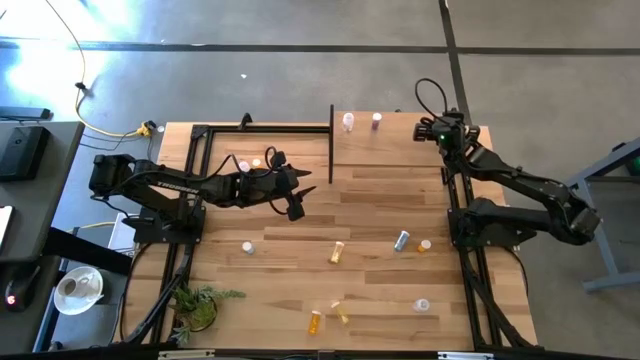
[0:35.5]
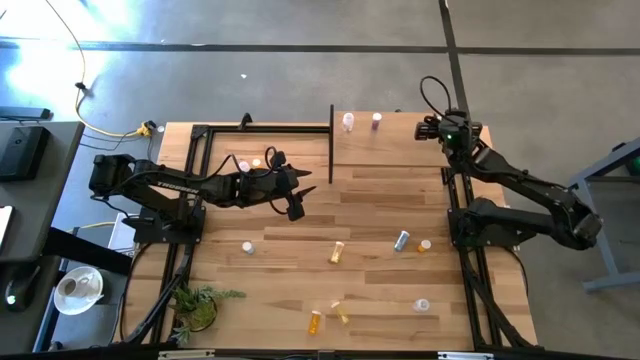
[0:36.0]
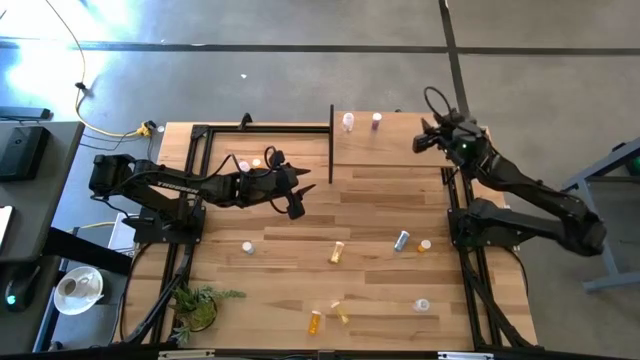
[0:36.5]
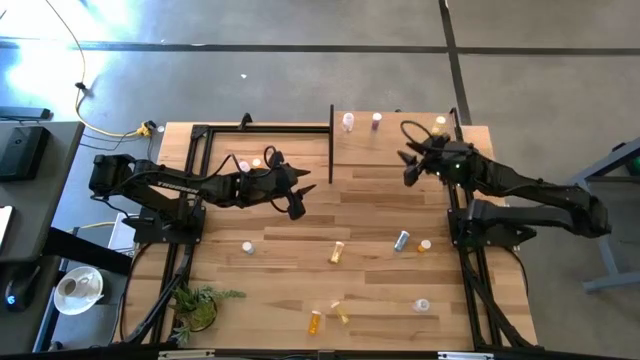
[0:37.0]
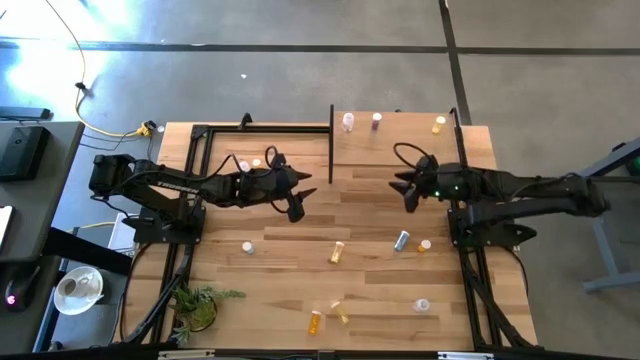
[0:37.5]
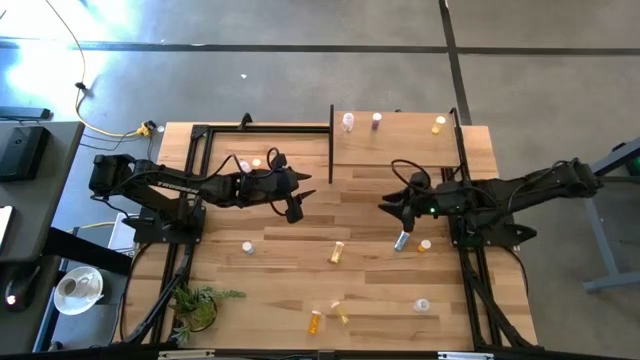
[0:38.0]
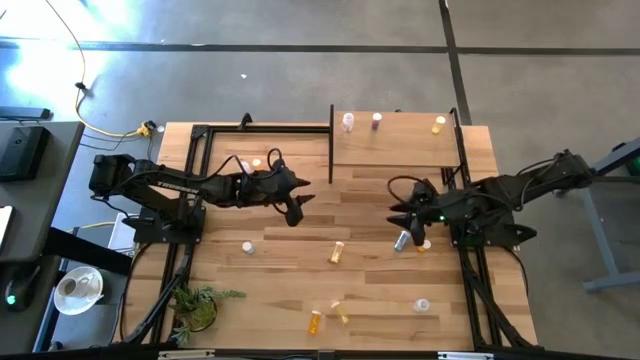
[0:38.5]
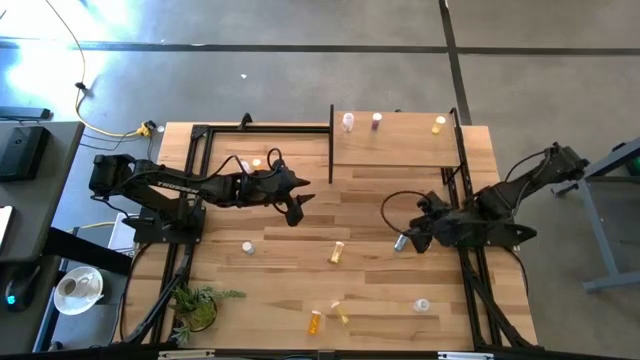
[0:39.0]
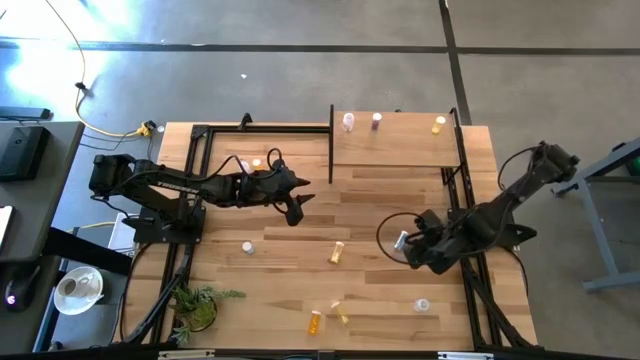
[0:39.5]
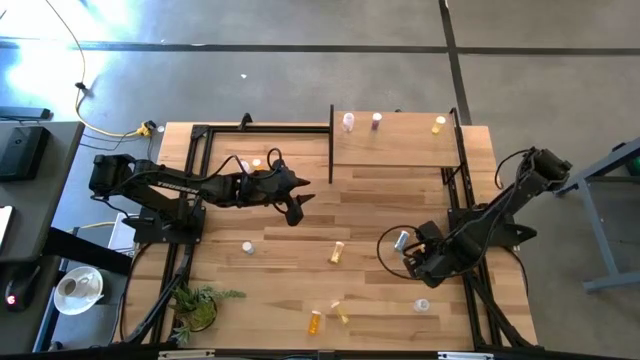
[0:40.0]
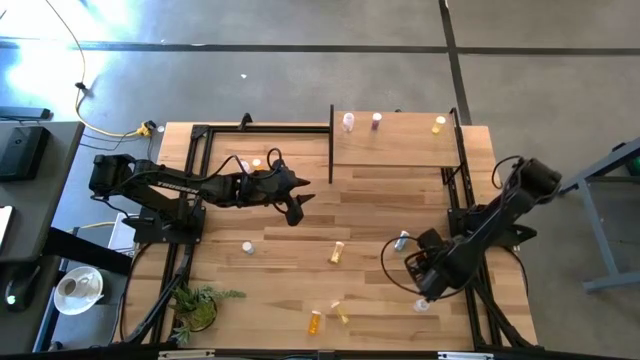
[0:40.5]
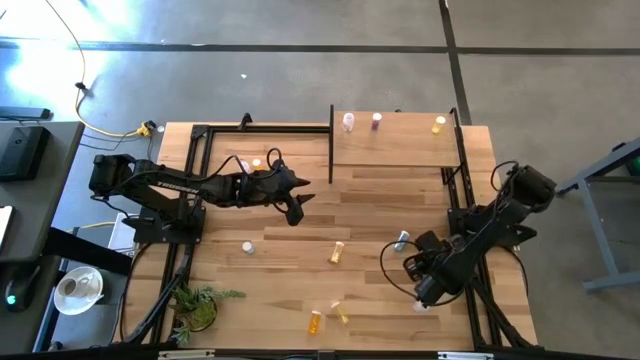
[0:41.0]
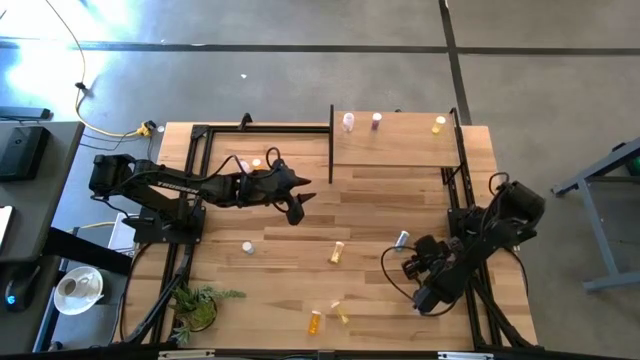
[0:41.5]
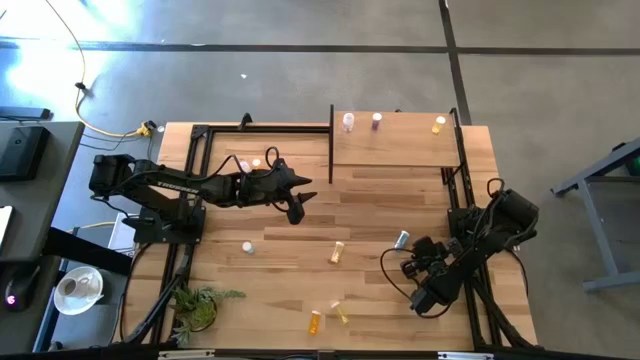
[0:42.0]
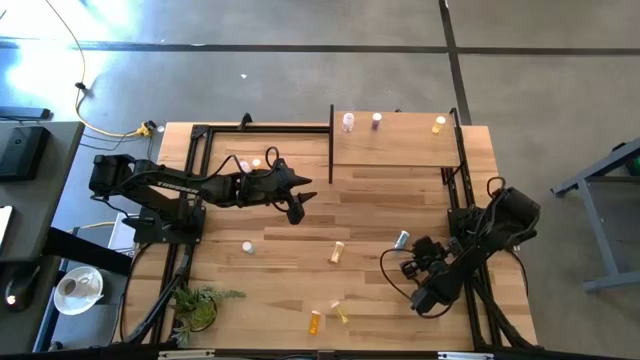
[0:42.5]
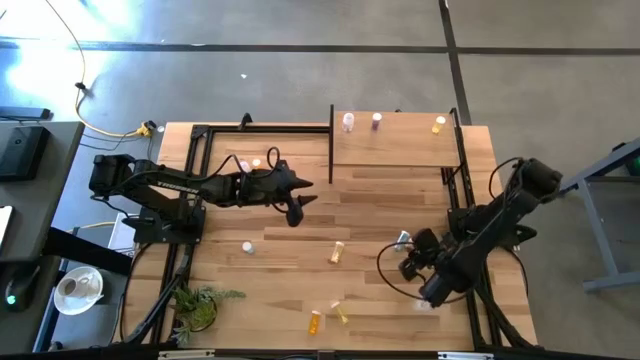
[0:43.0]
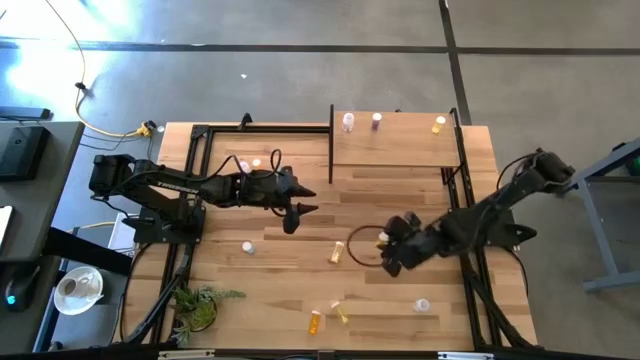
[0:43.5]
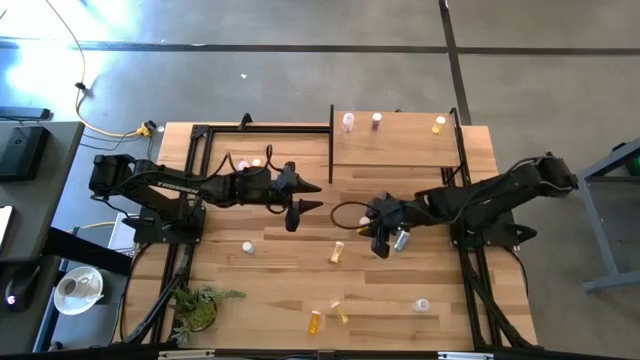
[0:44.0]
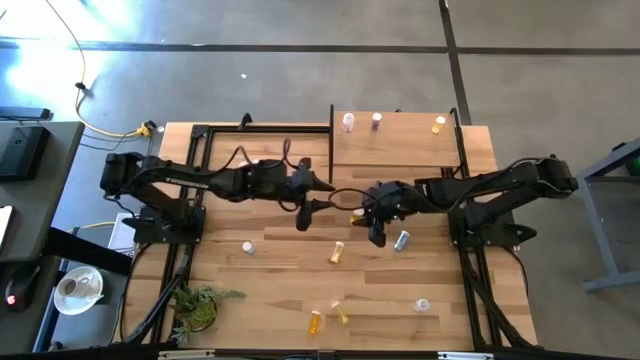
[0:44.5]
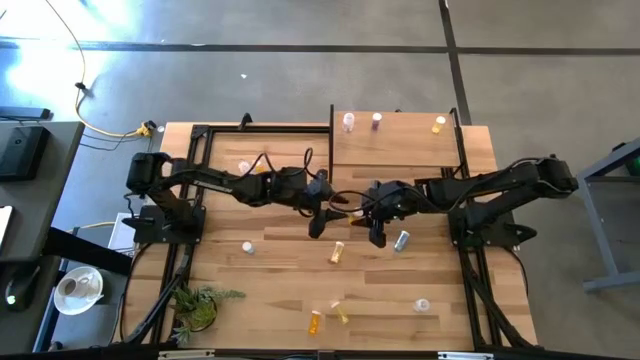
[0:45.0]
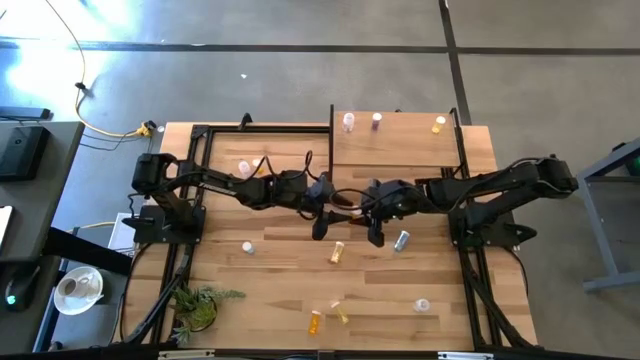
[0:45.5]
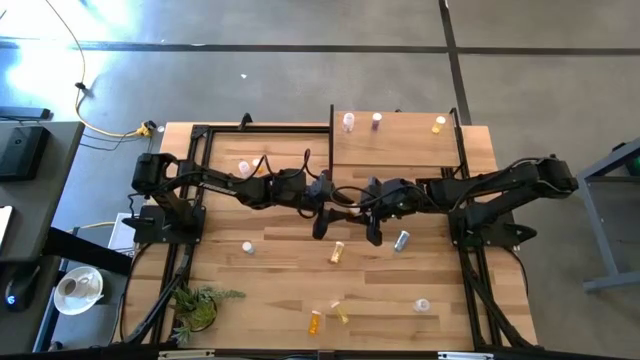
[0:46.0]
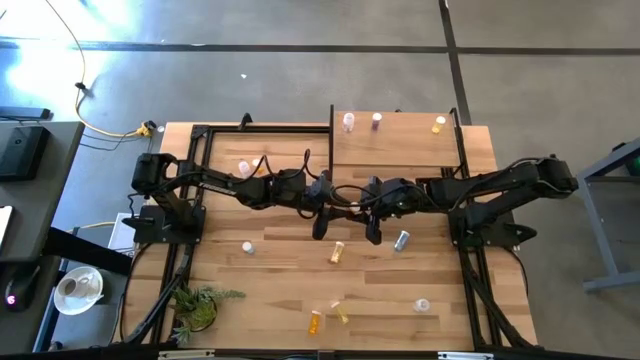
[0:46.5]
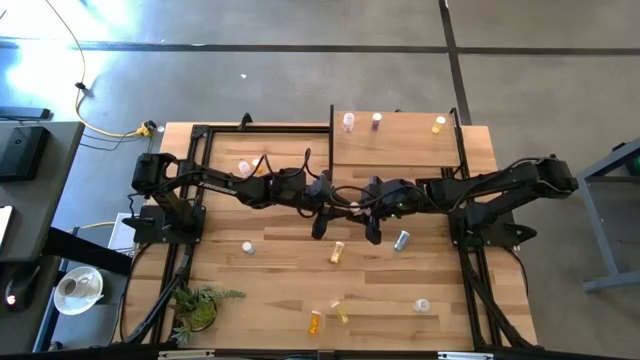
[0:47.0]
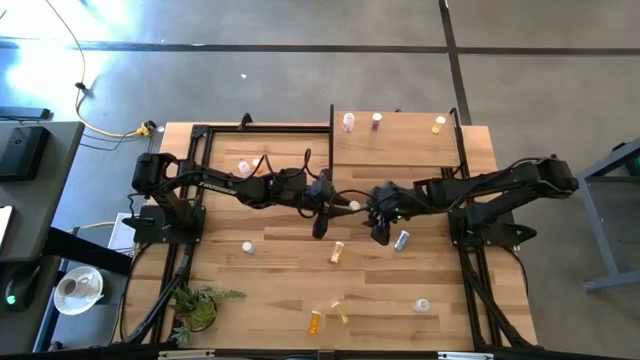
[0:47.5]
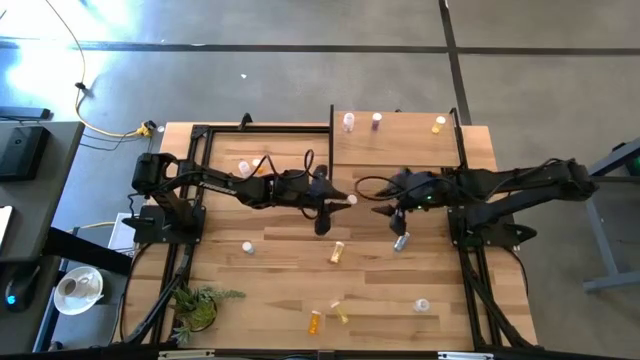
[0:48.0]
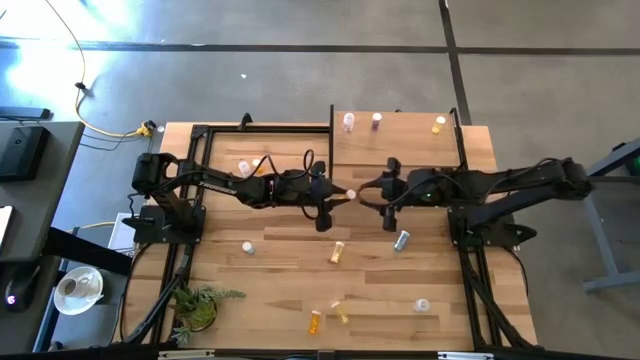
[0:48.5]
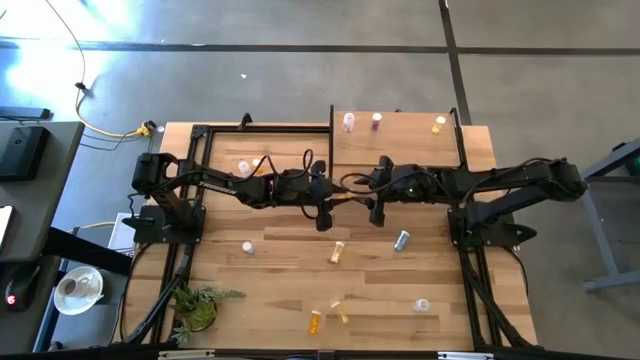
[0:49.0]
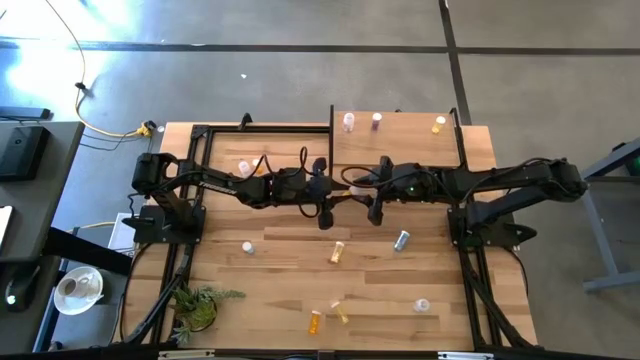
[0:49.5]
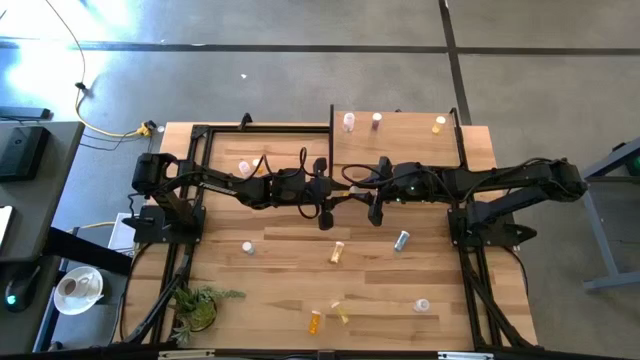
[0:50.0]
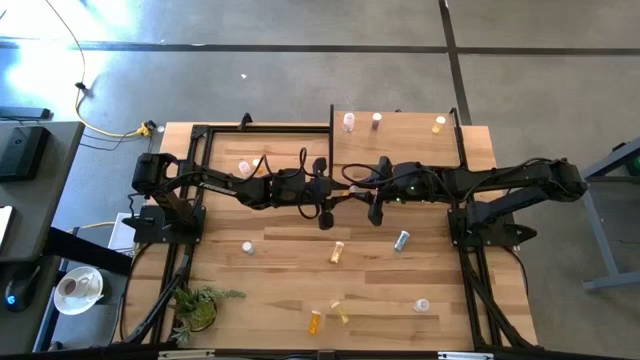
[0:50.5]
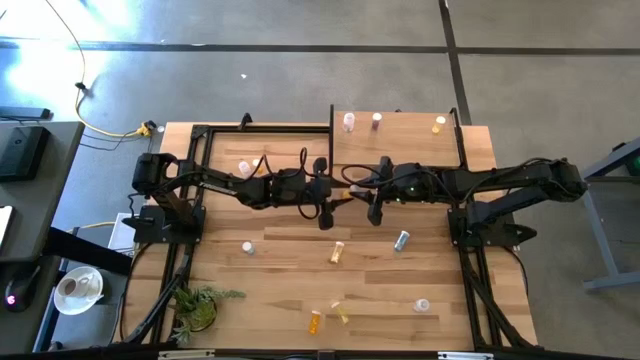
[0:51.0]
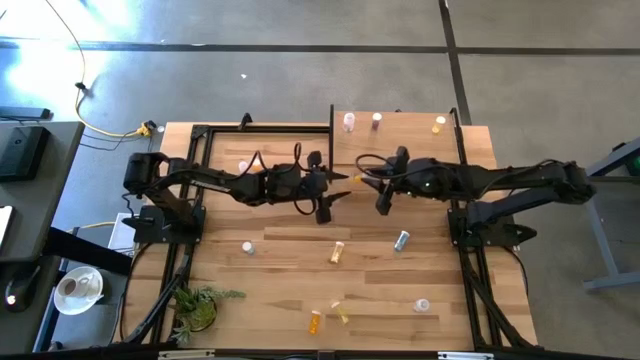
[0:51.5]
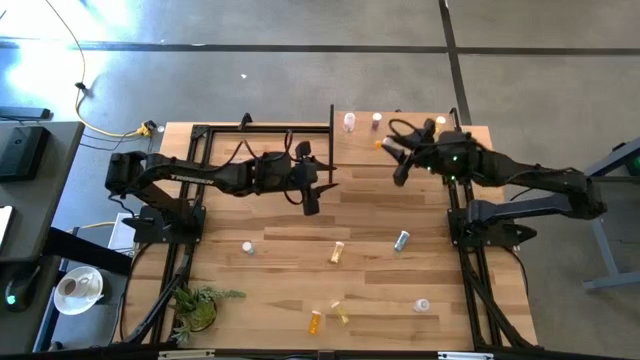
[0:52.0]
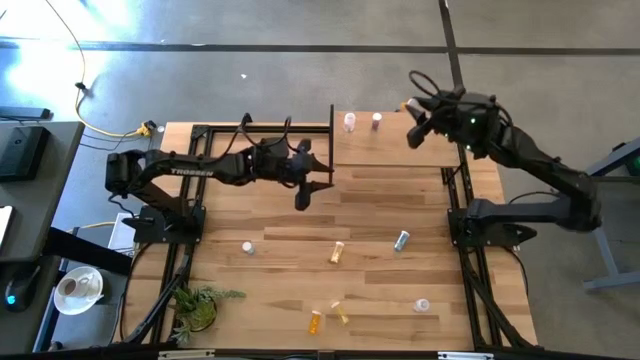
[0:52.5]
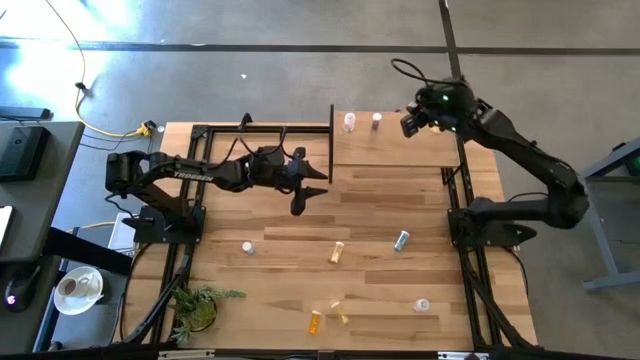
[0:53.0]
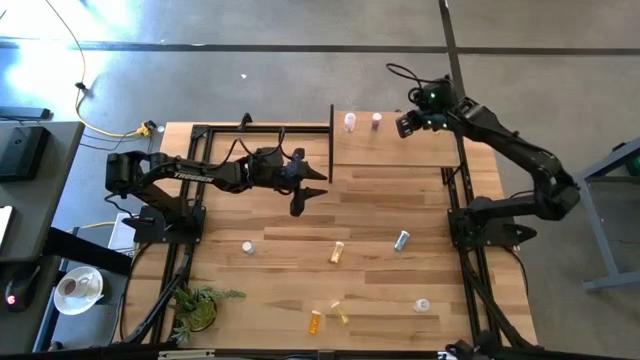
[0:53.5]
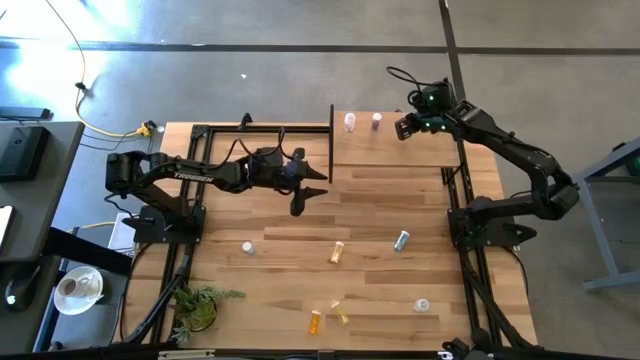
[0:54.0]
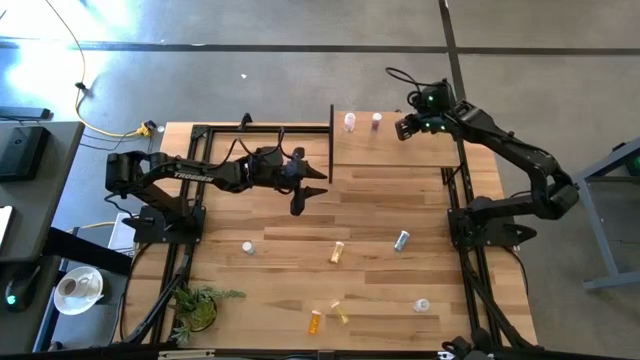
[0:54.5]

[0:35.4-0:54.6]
Task: Pick and place medicine bottles onto shelf by color
Put the middle orange pill bottle on the shelf

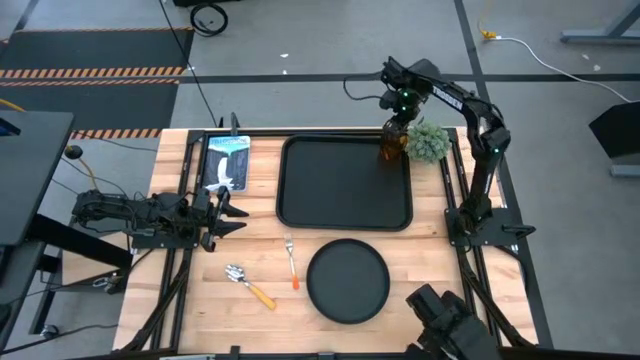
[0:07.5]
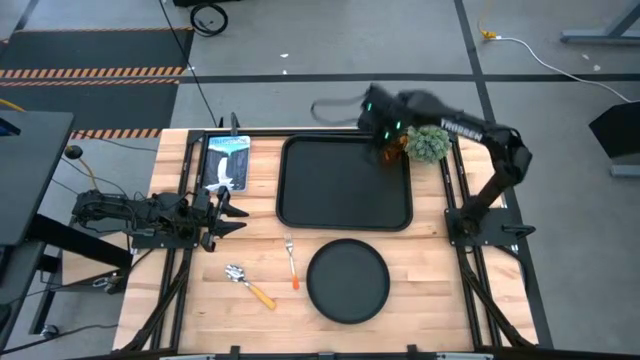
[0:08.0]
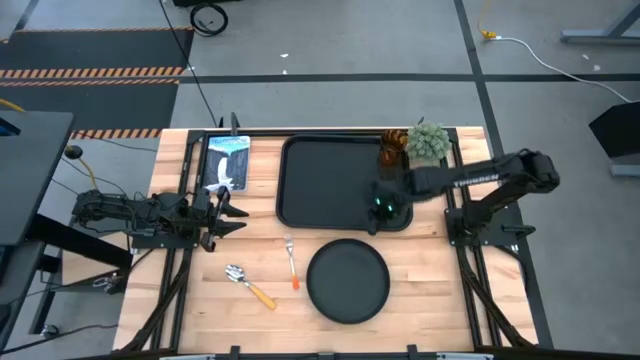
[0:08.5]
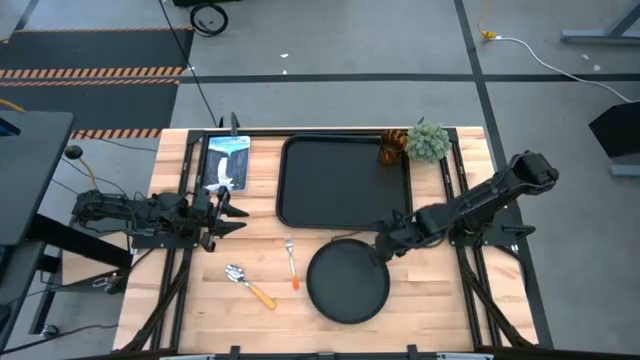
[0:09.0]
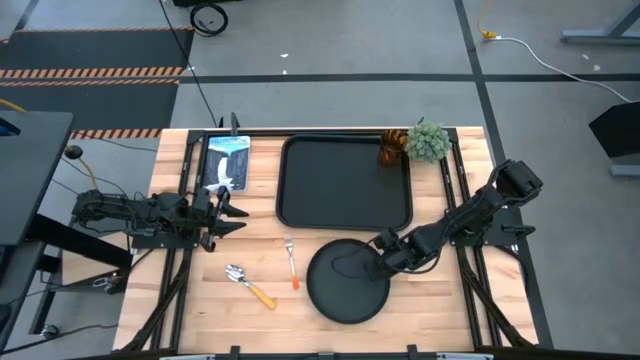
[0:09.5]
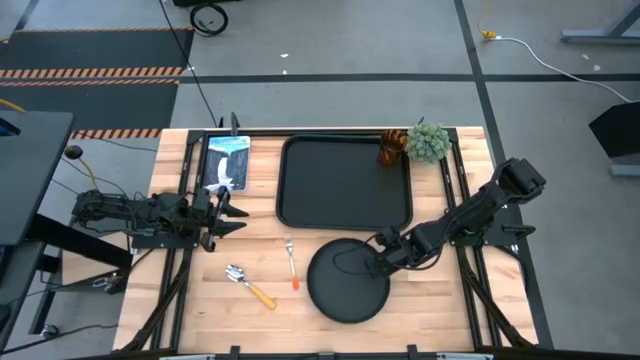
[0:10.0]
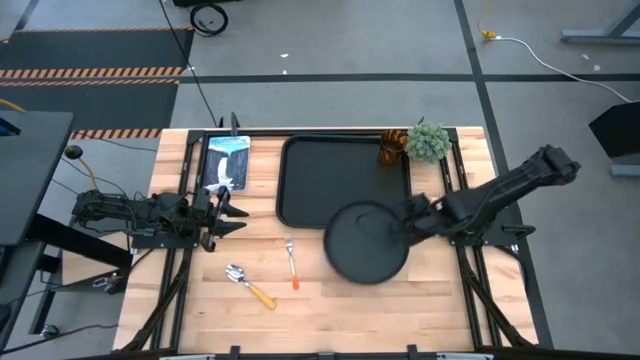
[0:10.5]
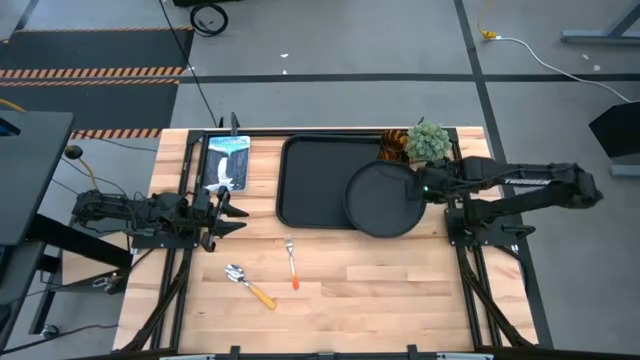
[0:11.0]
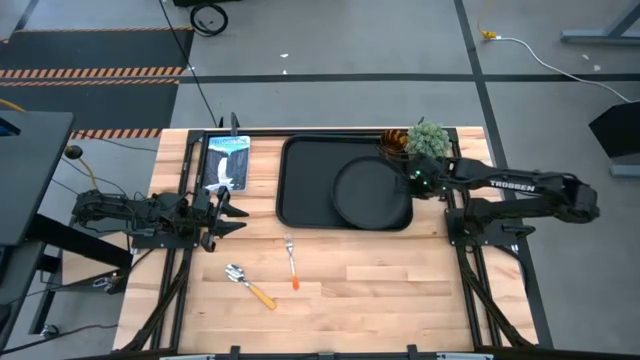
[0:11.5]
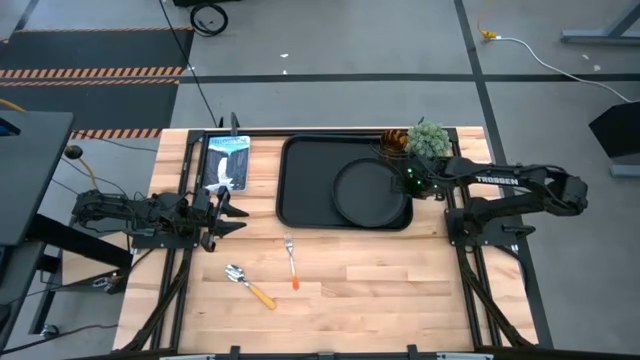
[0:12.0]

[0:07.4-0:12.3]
Task: Pick and place plate/cup/fork/spoon on tray
Put the black plate on the black tray to the bottom of the orange cup
